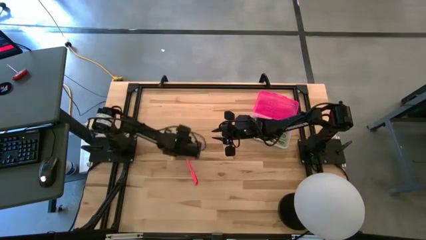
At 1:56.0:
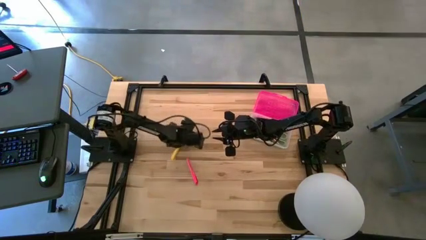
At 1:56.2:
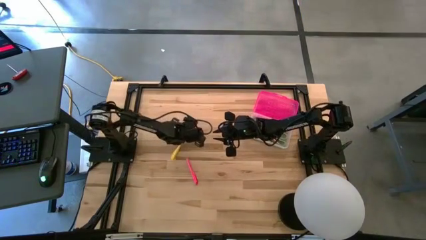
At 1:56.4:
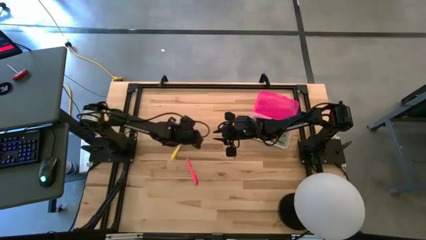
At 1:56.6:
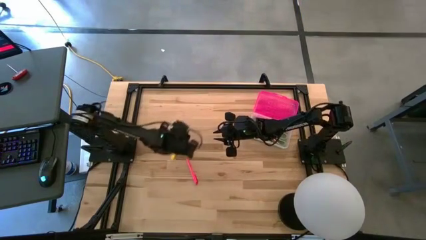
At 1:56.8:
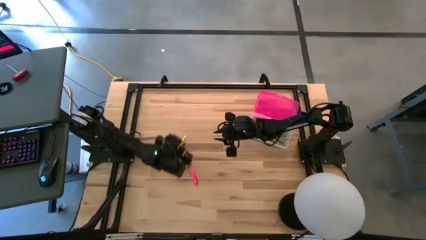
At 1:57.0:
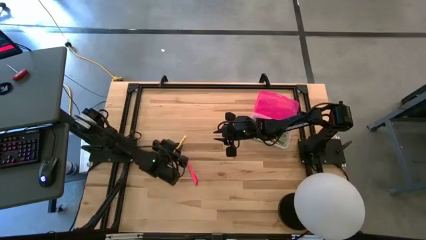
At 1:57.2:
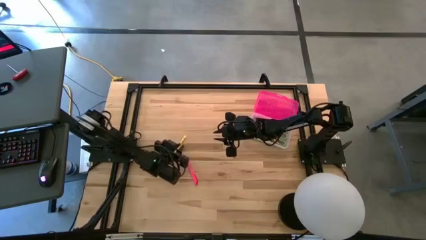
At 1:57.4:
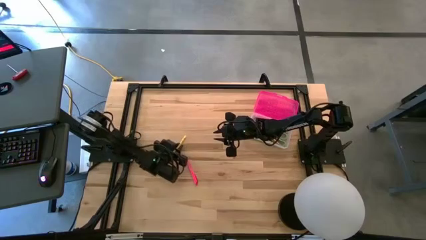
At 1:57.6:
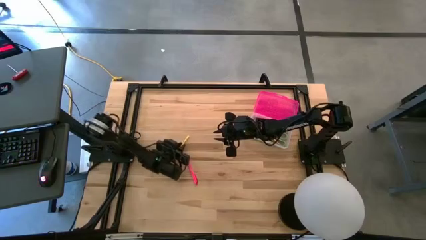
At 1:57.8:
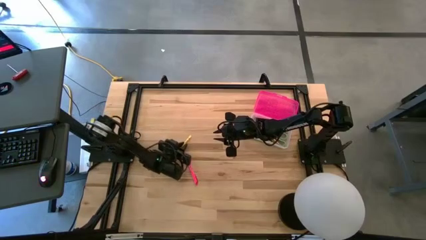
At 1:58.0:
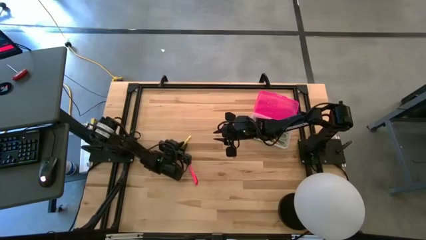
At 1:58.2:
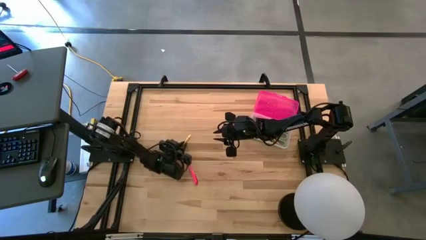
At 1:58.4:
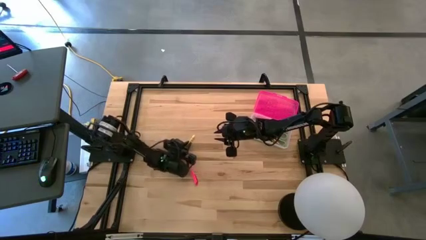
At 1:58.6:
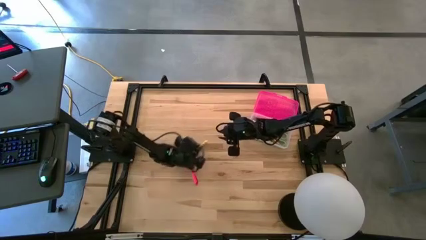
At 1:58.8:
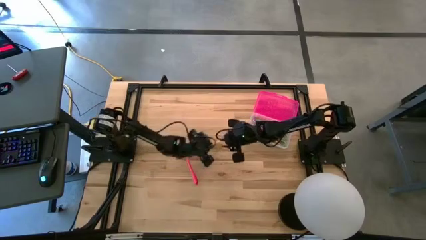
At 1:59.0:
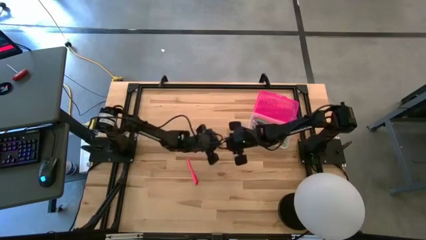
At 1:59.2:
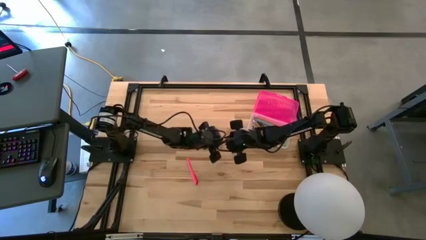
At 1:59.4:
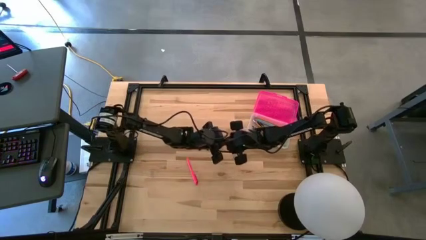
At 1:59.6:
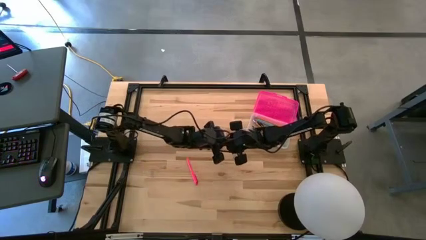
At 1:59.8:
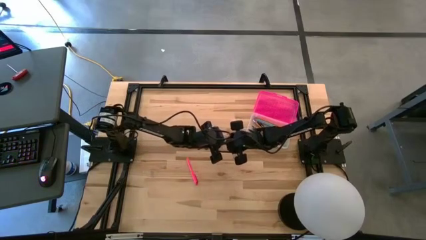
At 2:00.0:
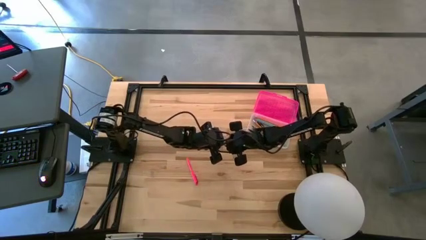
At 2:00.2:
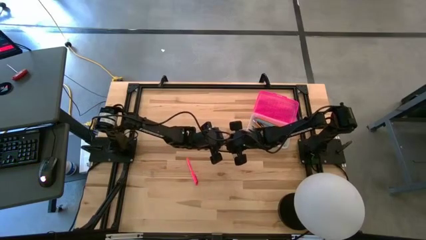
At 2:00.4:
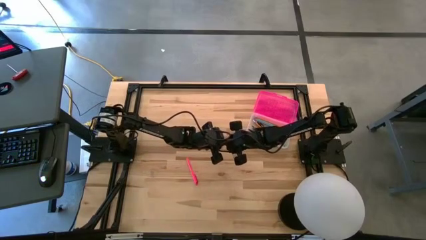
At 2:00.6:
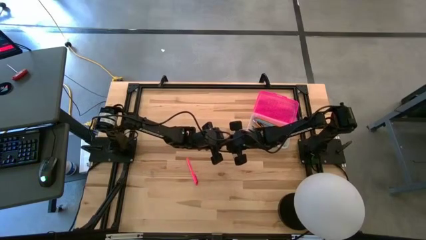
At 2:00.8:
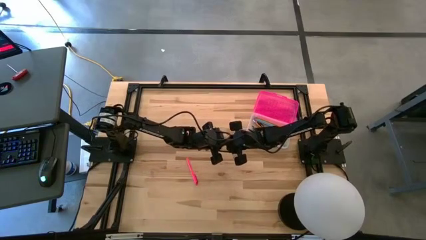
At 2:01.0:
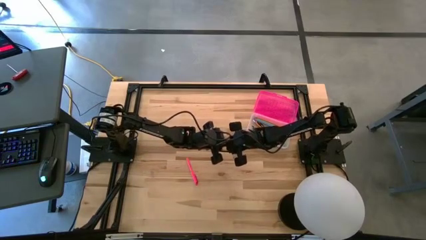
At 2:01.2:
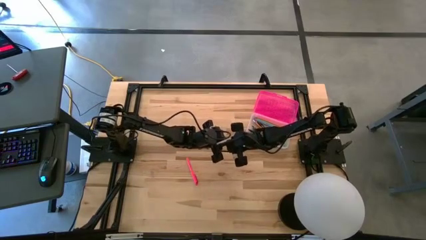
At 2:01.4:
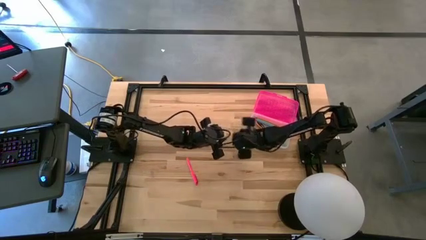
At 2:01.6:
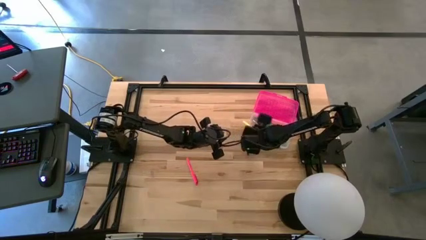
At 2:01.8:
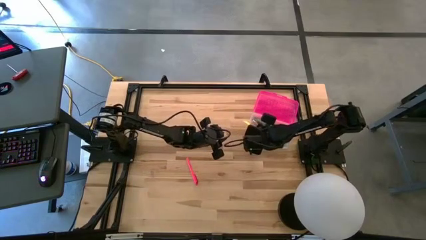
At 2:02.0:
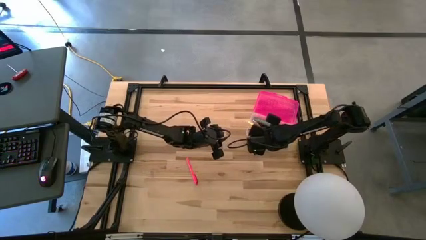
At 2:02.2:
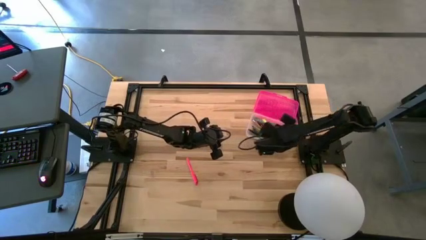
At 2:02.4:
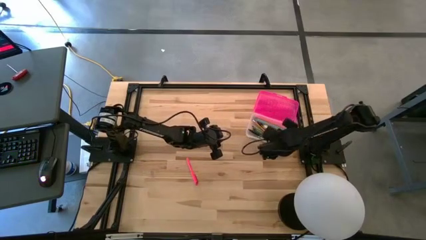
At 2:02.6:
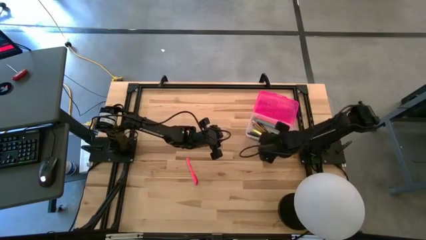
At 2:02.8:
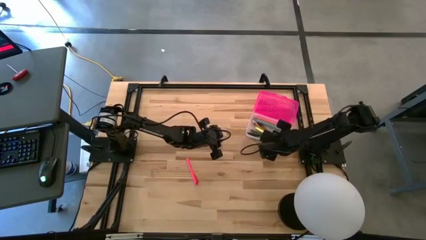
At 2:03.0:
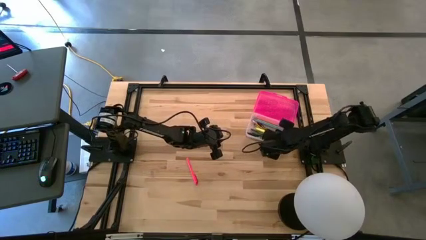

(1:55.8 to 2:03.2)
Task: Pick & place school supplies into a supply box
Put the yellow pen into the pink supply box

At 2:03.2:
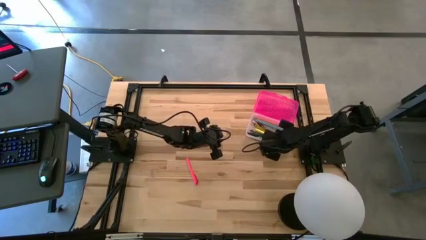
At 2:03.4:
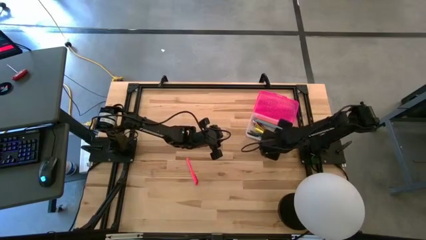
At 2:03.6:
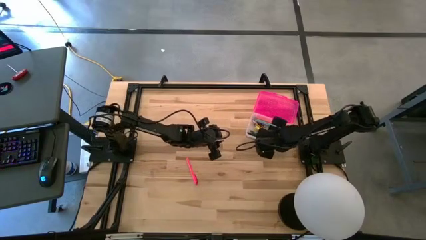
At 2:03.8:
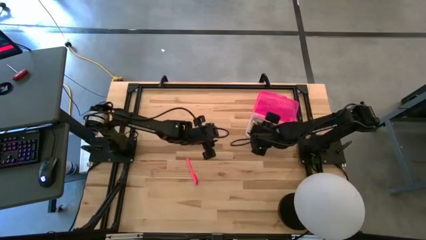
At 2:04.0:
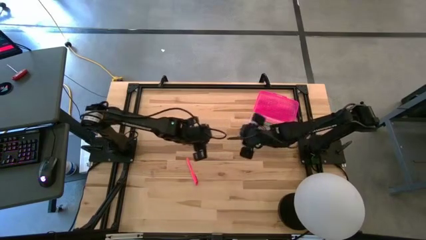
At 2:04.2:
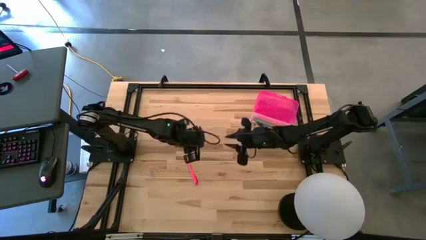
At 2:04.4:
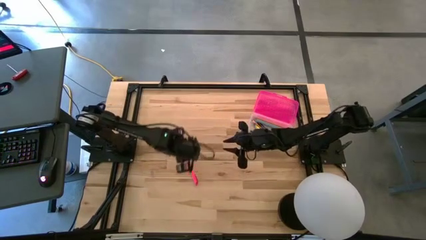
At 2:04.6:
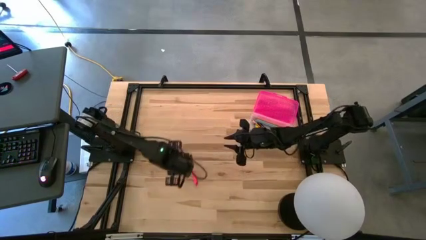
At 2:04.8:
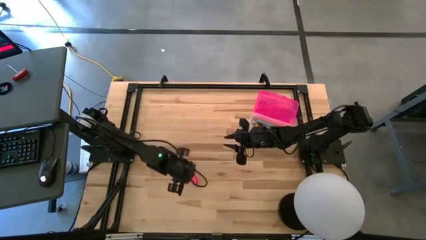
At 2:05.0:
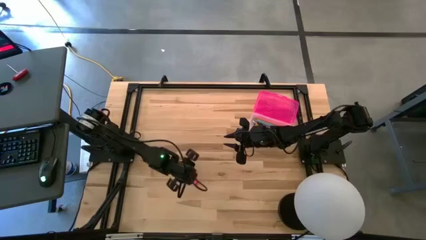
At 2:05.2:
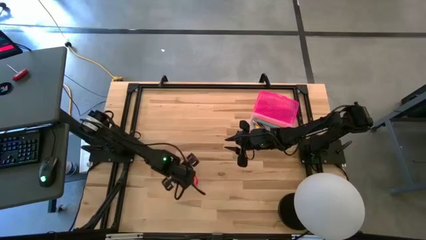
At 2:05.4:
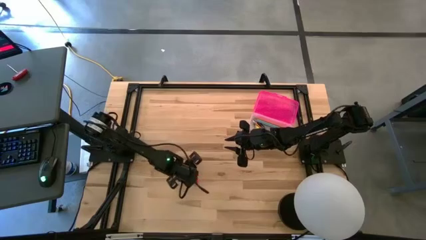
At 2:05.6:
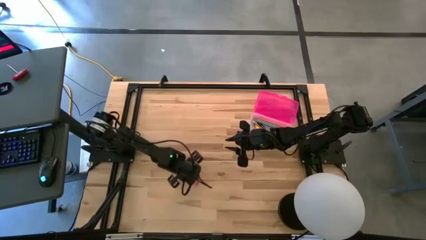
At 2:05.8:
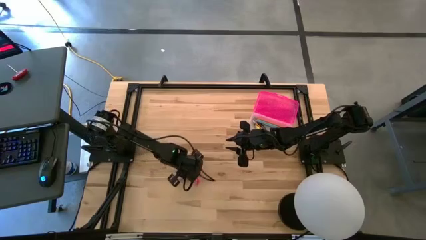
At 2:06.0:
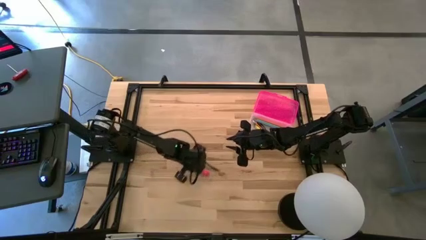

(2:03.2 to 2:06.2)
Put the pink pen into the pink supply box

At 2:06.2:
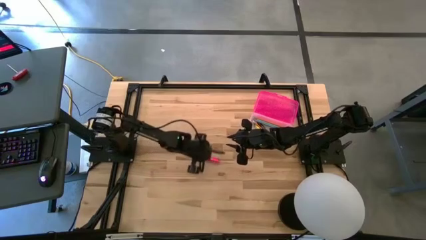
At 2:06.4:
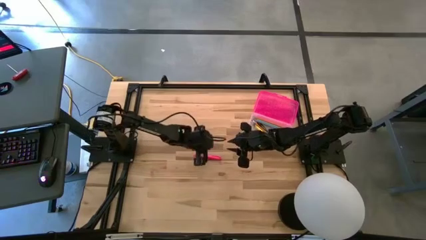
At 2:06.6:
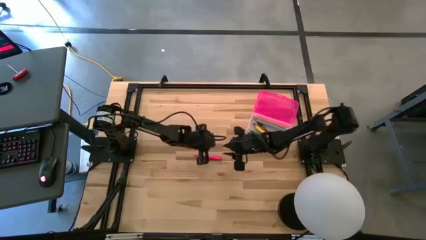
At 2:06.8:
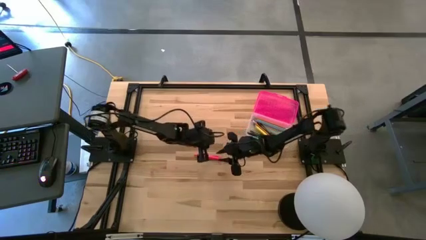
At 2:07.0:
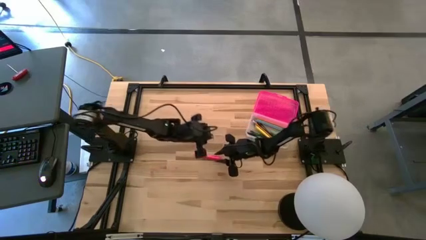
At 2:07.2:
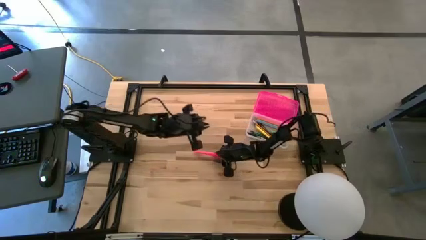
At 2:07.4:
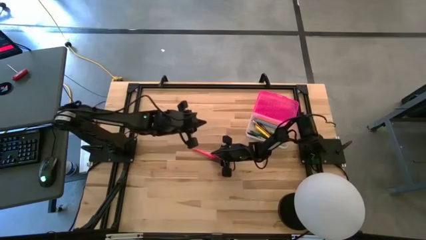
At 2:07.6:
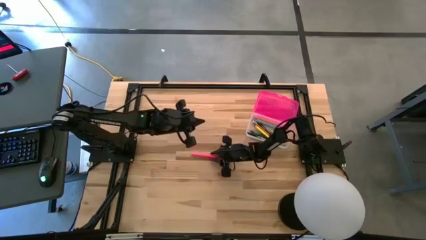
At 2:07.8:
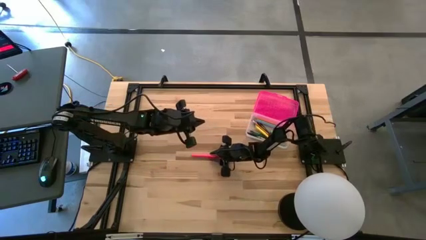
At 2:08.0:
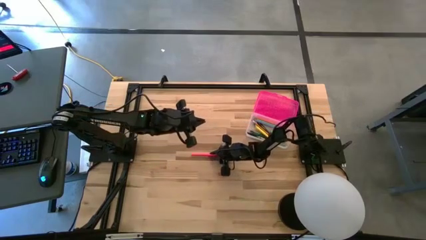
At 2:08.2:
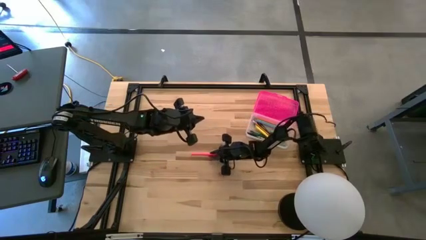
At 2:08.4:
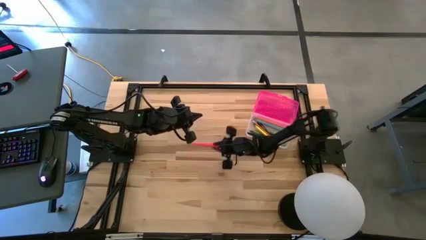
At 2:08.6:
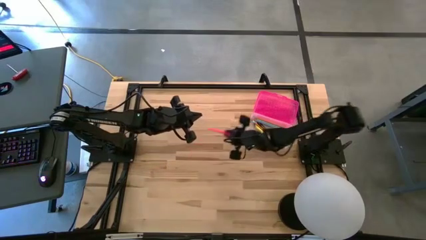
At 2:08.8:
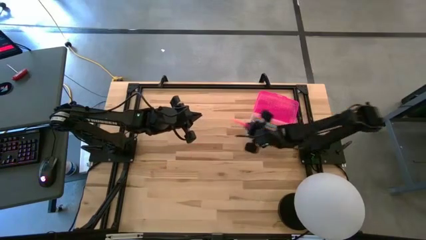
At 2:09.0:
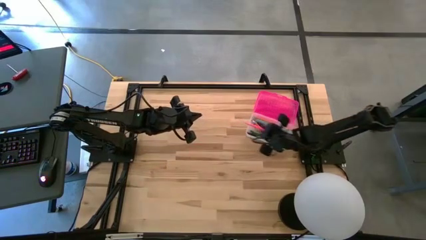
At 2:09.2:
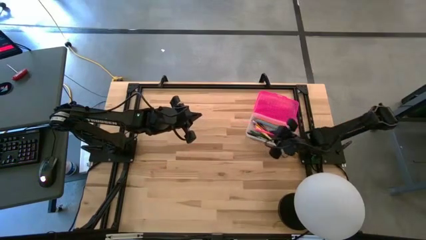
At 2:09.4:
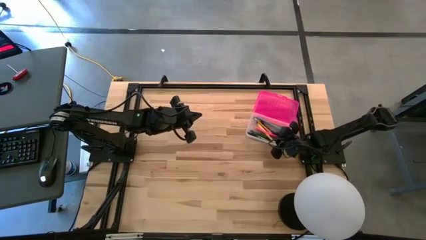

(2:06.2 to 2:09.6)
Put the pink pen into the pink supply box

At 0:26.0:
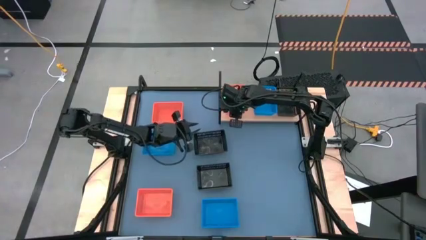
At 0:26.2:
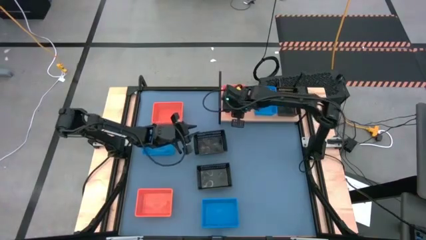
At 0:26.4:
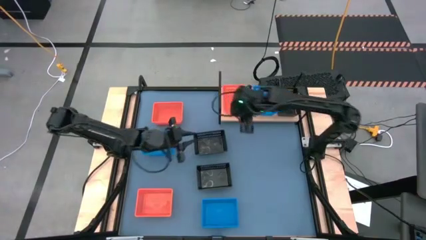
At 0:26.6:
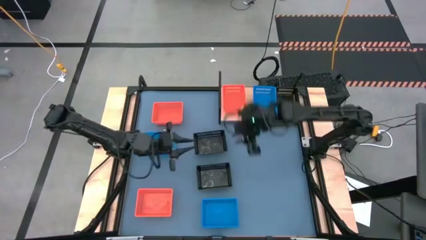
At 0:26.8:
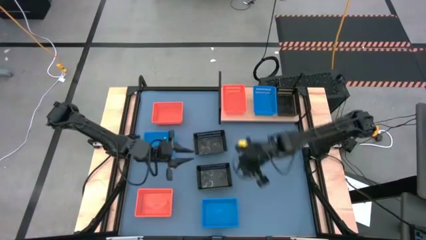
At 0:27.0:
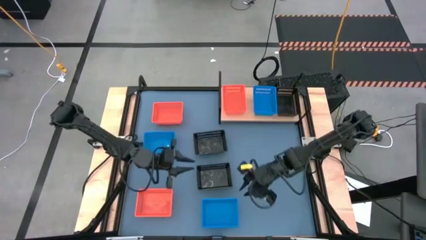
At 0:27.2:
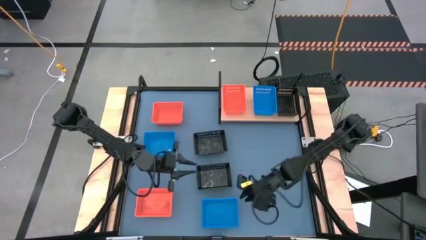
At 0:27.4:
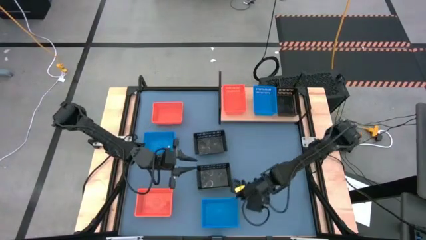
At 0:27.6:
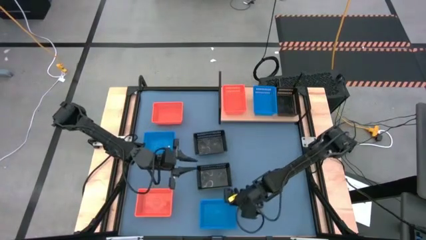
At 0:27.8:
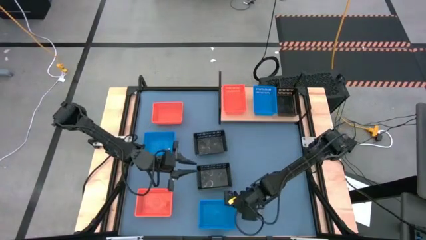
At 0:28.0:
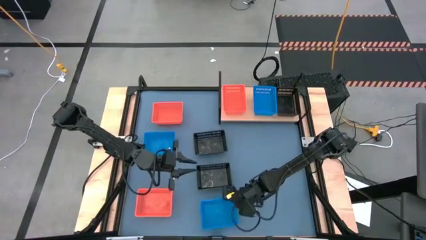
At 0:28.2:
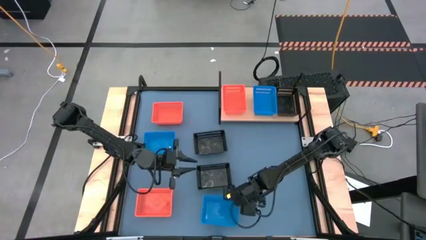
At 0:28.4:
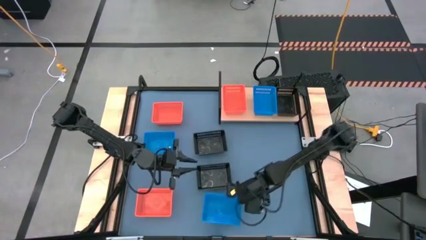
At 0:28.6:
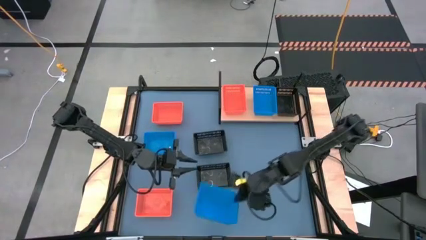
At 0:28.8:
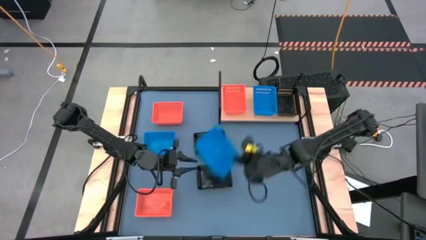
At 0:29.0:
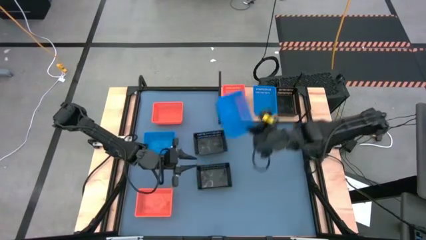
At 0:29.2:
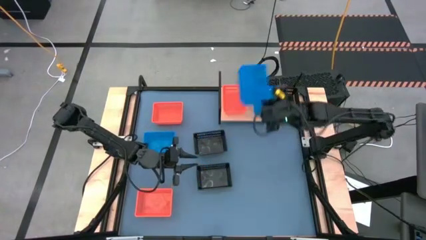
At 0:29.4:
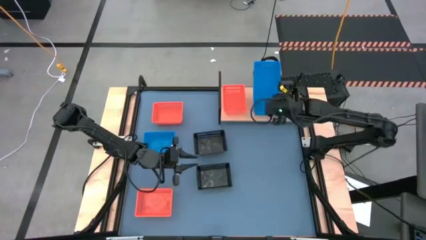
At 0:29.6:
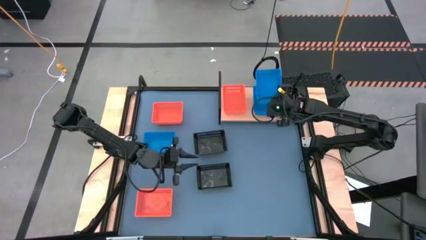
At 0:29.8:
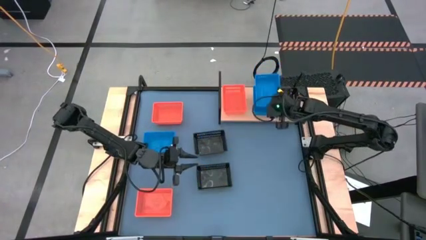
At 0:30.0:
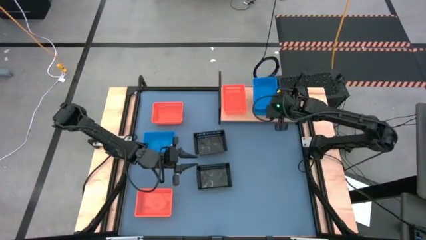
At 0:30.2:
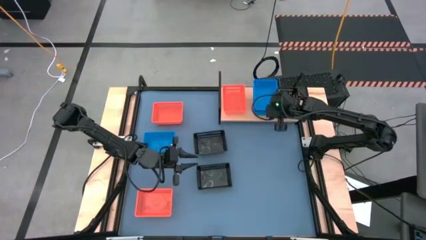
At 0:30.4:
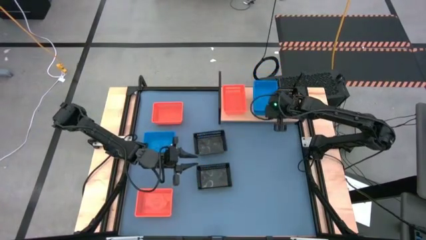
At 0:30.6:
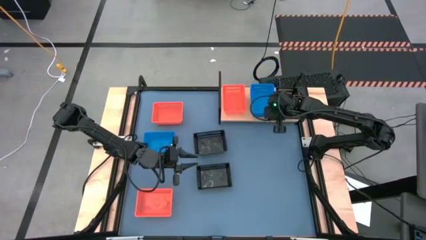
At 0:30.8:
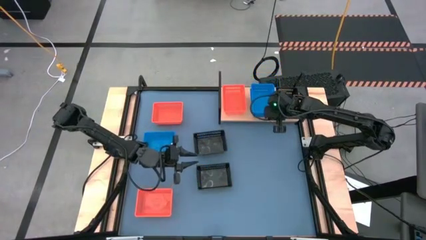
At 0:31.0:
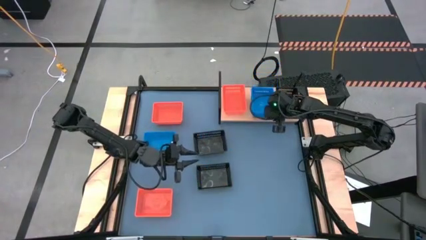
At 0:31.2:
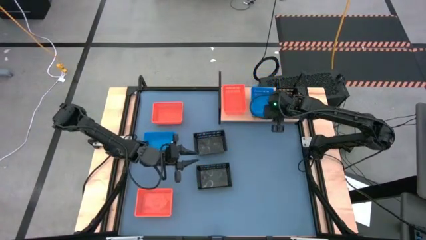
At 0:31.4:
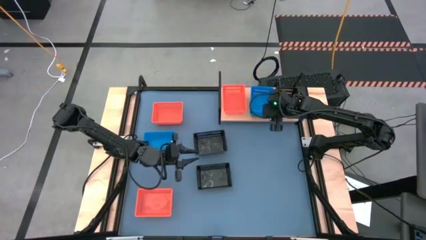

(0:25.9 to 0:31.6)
Task: Stack baskets on shelf by color
Put the bottom right blue basket on the shelf
